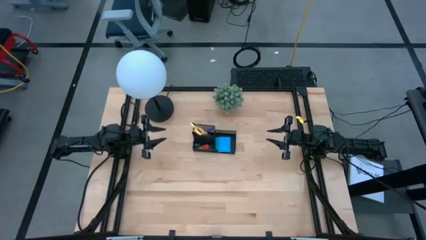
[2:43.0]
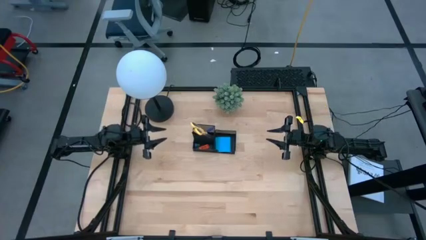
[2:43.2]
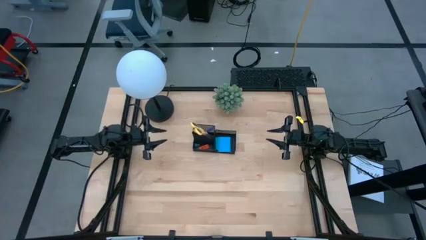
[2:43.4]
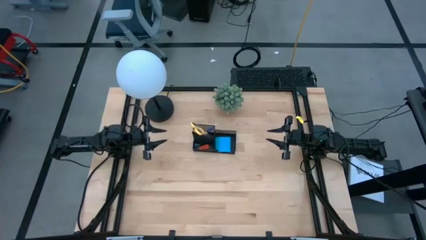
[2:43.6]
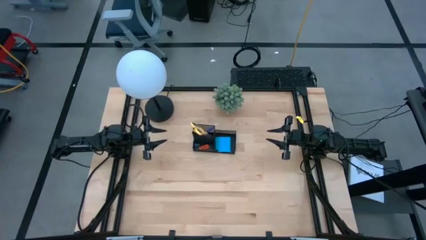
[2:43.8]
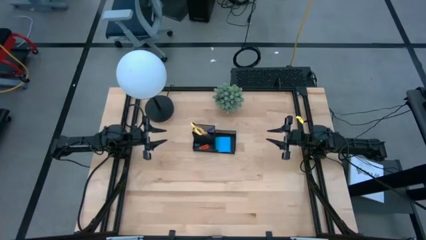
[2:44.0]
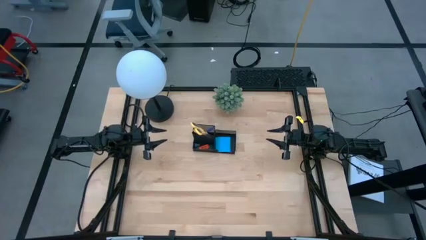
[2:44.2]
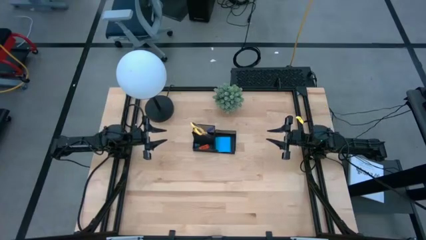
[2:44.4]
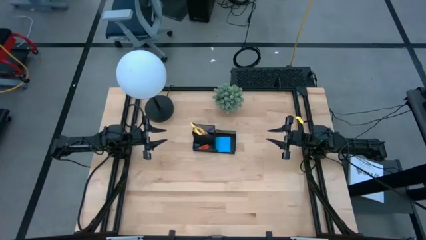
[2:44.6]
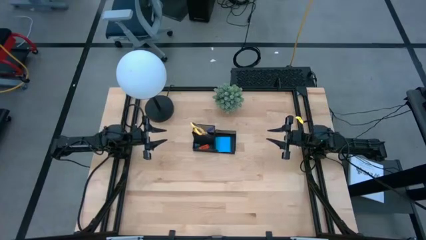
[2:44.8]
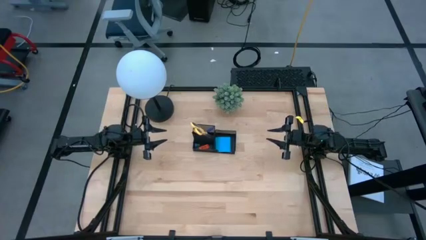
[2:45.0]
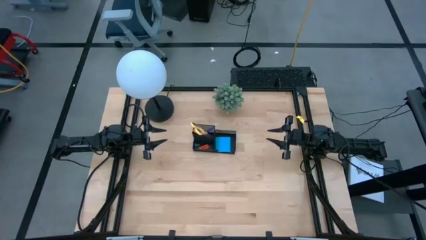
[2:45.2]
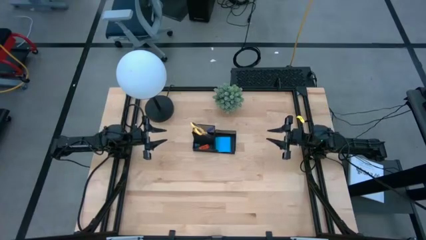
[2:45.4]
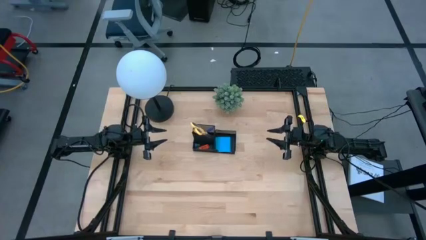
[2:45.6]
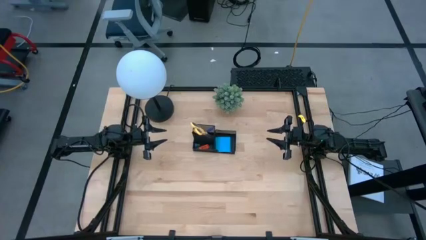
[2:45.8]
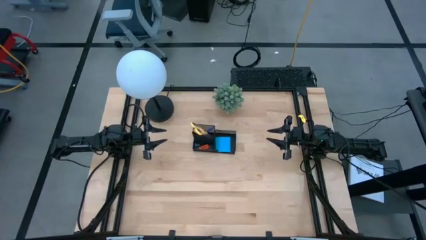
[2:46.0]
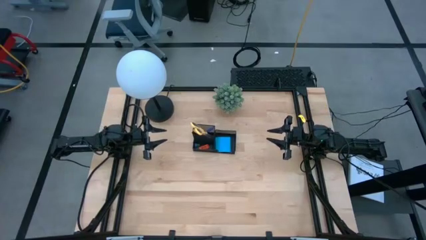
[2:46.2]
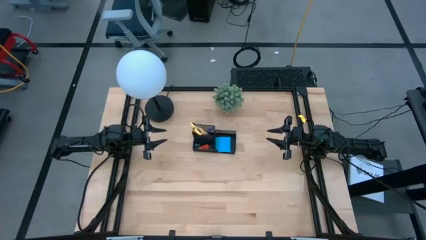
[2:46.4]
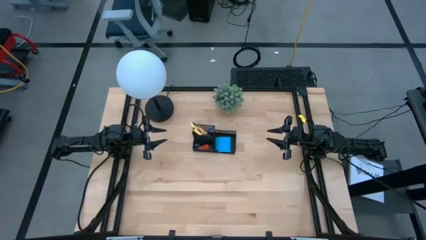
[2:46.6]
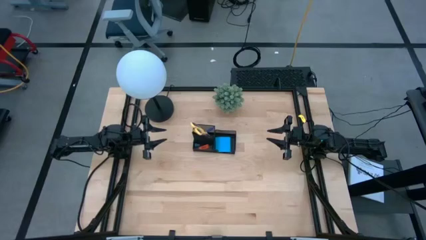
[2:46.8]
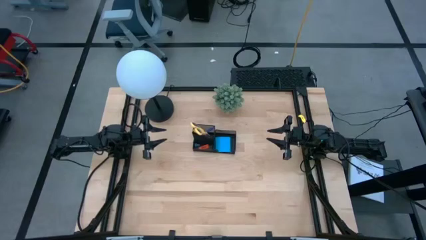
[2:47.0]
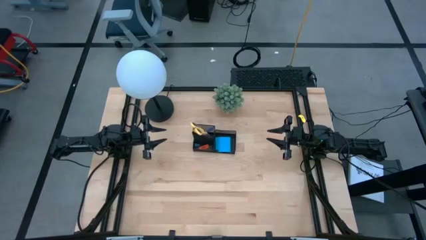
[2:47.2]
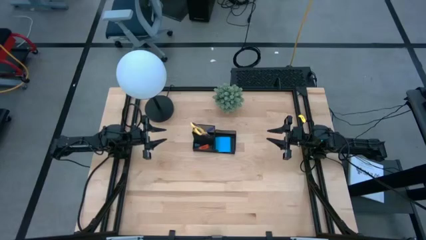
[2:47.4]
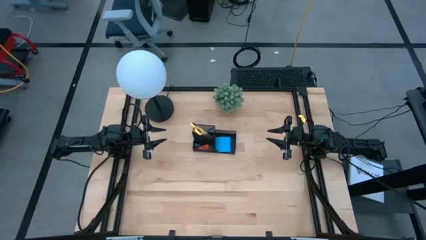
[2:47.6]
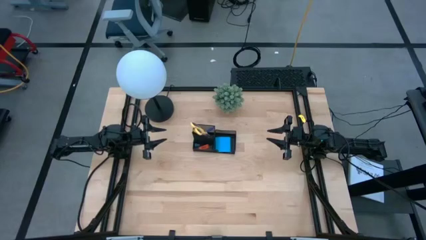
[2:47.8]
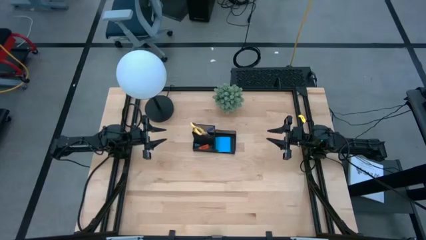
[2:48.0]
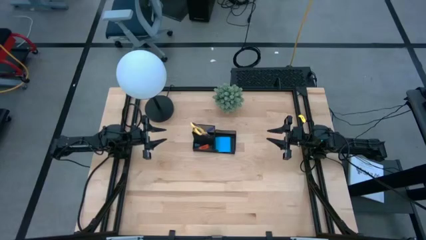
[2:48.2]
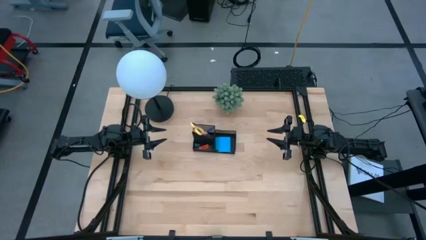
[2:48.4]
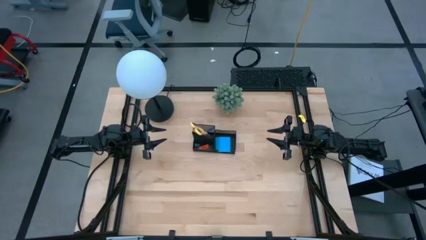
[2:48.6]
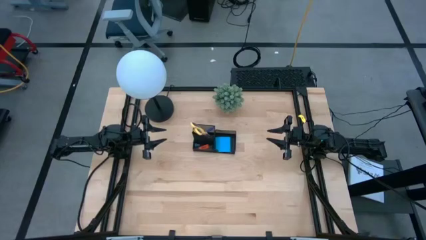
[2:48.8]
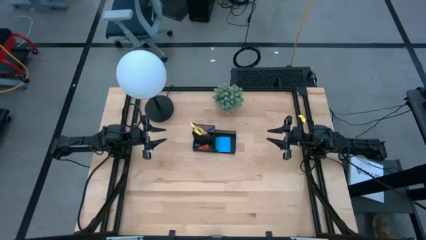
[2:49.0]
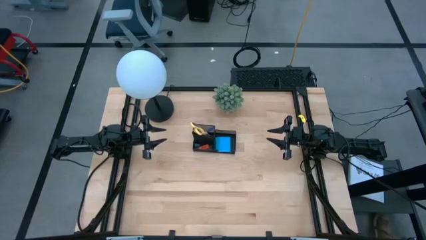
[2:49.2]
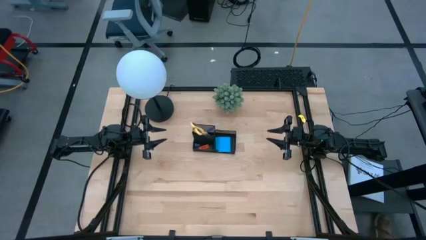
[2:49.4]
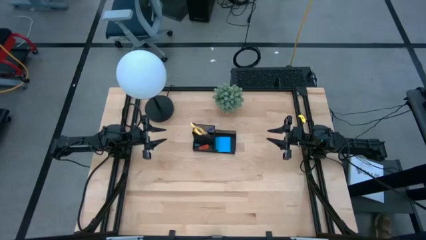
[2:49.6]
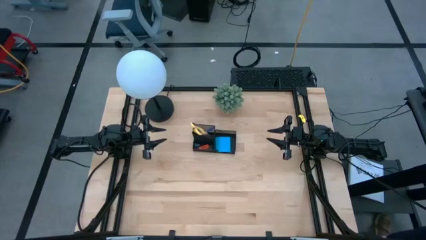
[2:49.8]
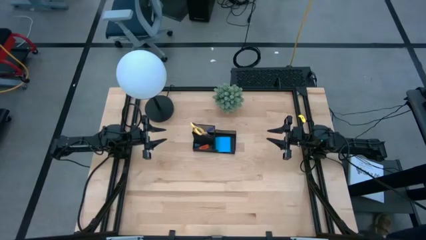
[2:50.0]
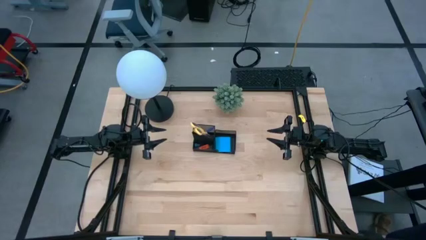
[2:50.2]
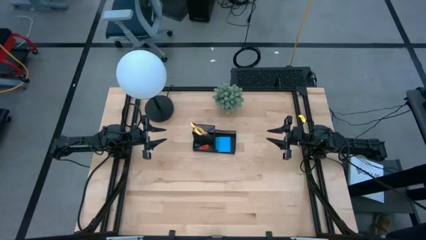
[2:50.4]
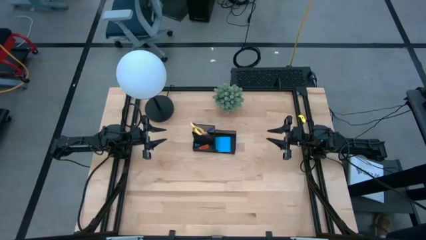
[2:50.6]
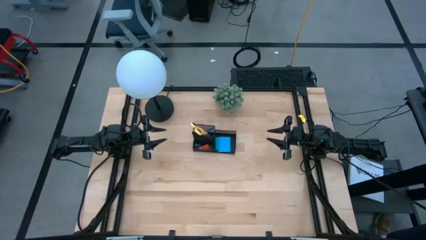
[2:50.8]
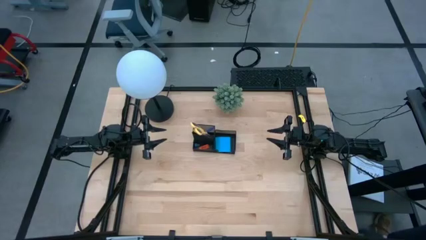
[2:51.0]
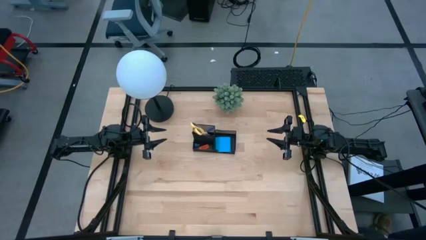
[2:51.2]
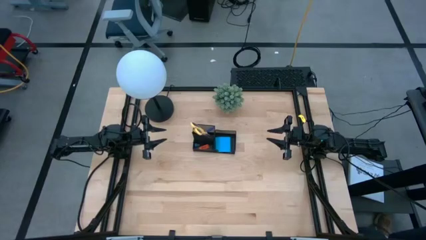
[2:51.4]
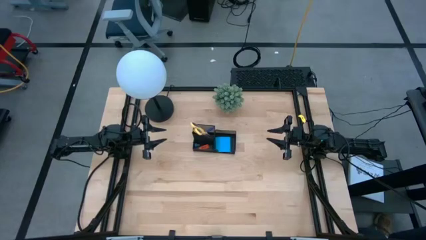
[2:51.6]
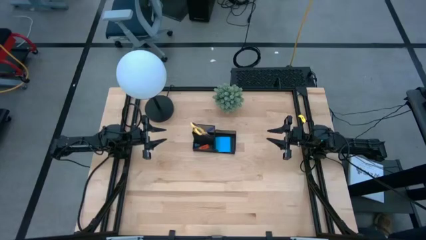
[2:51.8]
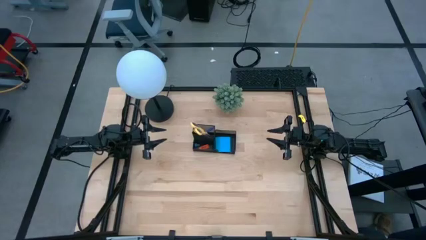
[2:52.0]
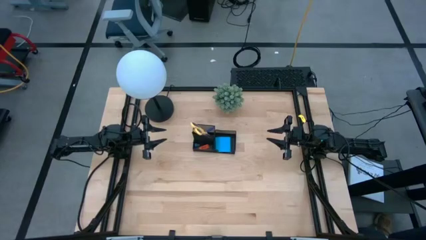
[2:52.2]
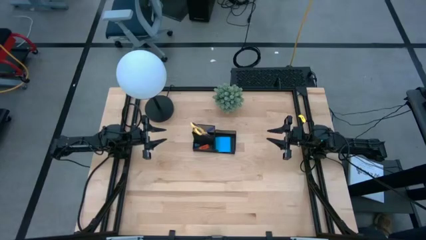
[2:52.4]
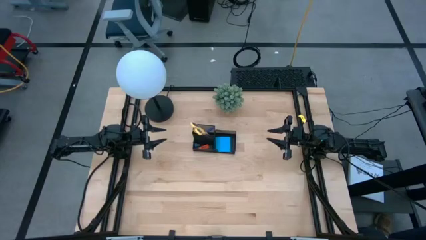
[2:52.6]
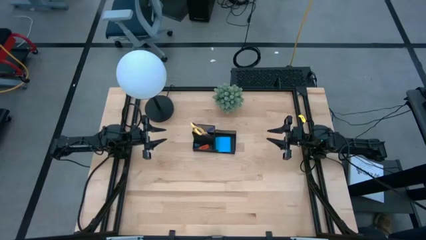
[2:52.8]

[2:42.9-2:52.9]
Task: Pick and place office supplies into organizer
Return to Home Position
